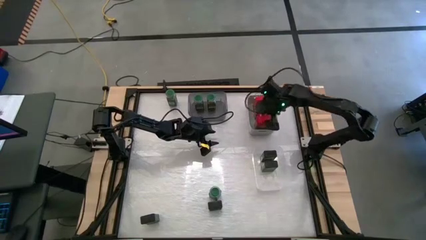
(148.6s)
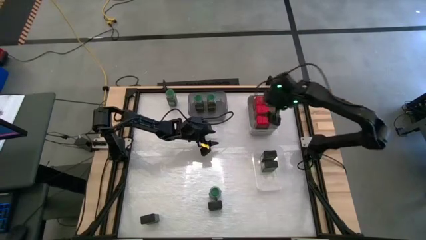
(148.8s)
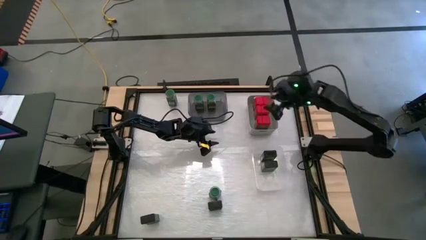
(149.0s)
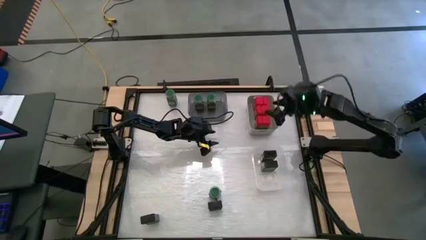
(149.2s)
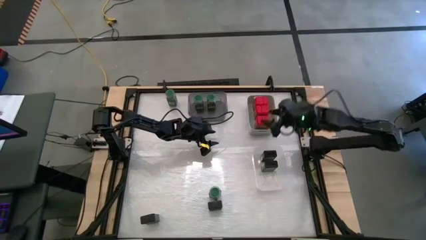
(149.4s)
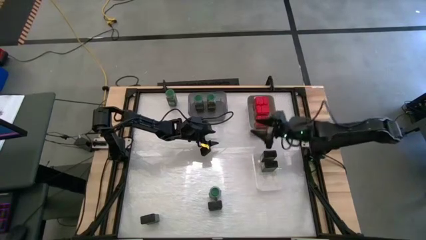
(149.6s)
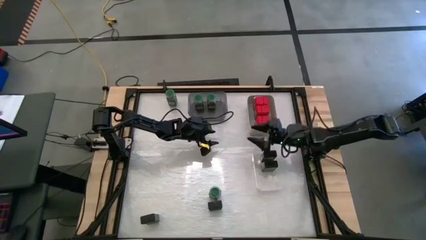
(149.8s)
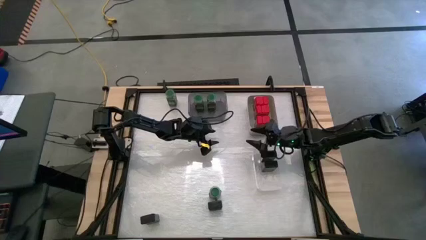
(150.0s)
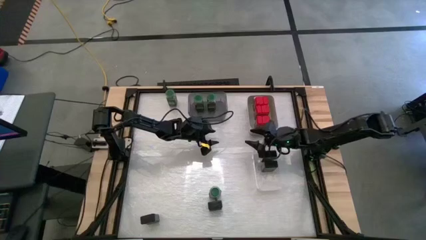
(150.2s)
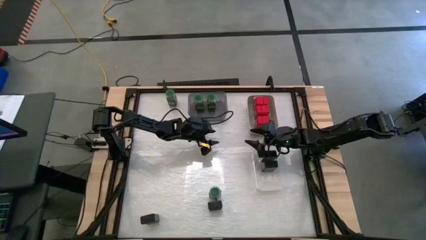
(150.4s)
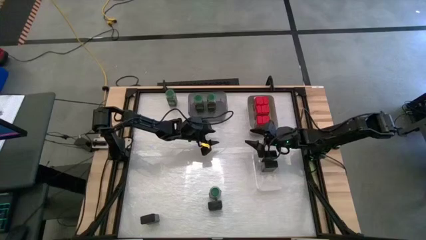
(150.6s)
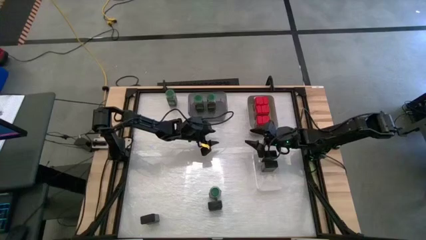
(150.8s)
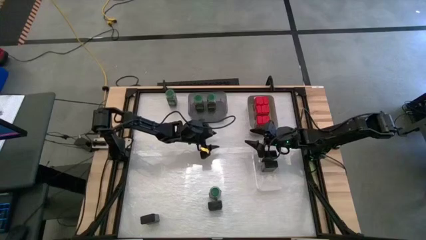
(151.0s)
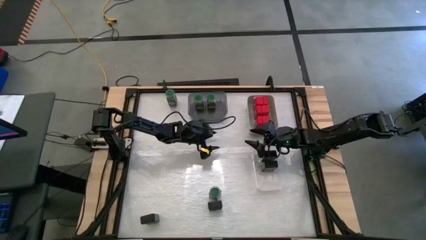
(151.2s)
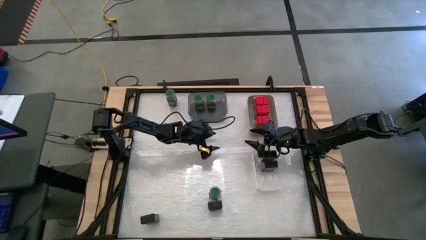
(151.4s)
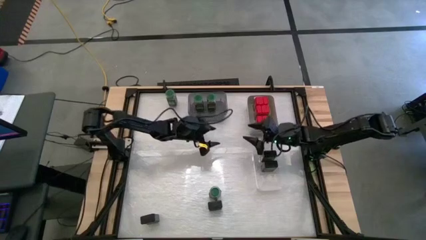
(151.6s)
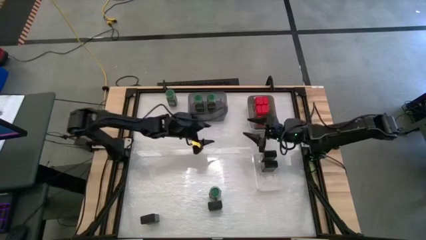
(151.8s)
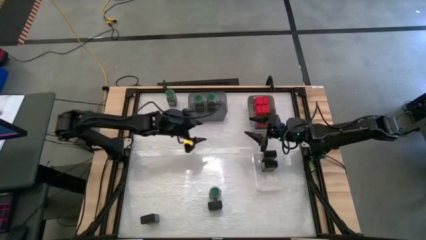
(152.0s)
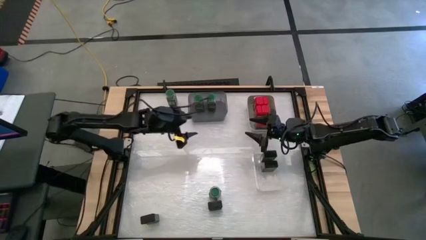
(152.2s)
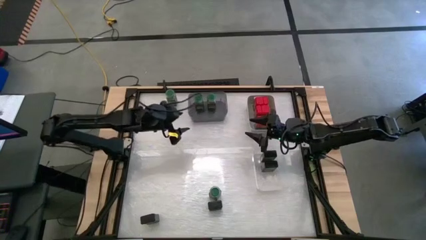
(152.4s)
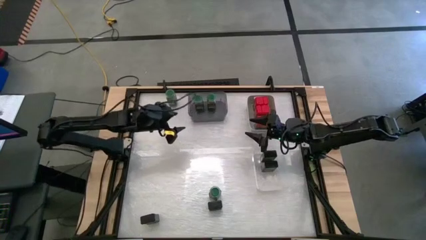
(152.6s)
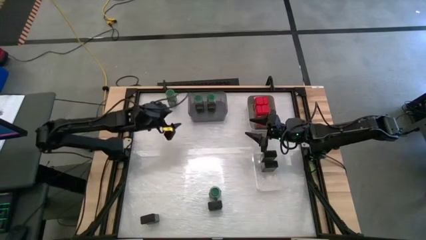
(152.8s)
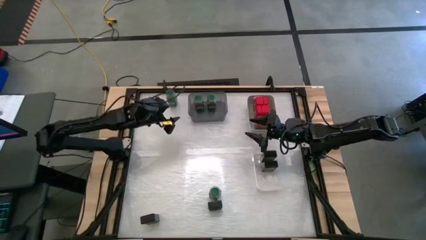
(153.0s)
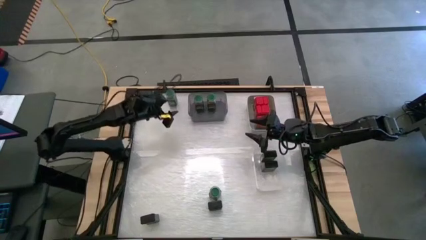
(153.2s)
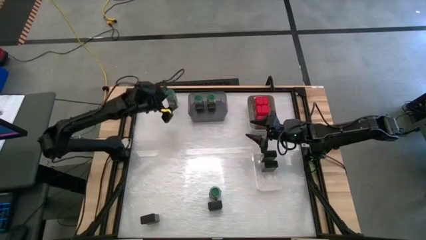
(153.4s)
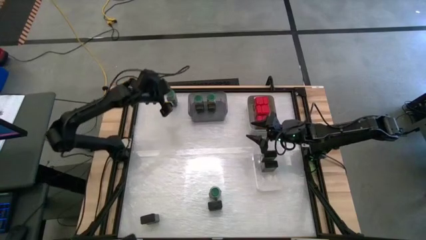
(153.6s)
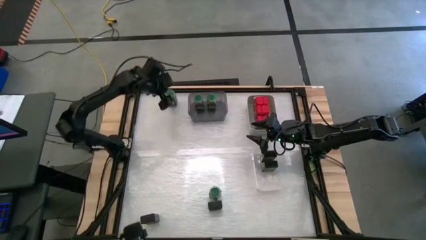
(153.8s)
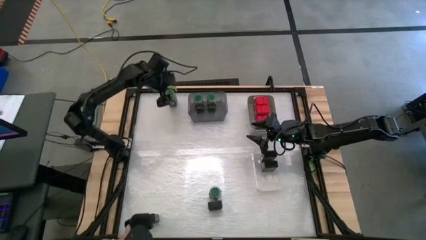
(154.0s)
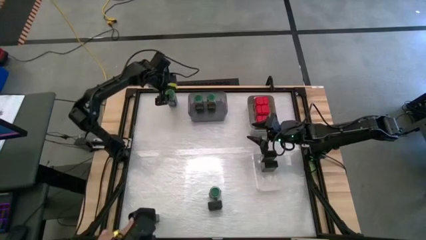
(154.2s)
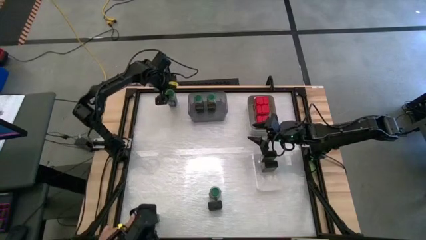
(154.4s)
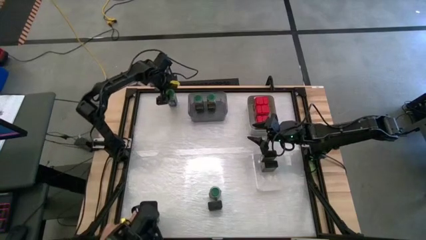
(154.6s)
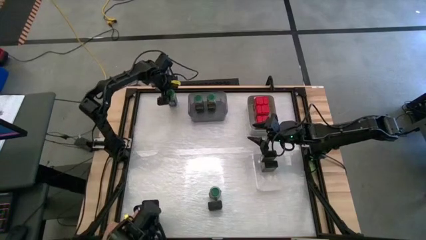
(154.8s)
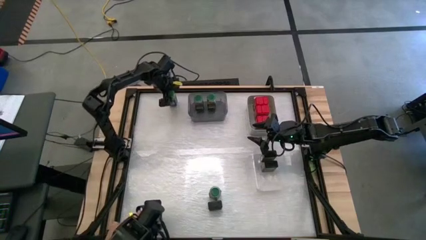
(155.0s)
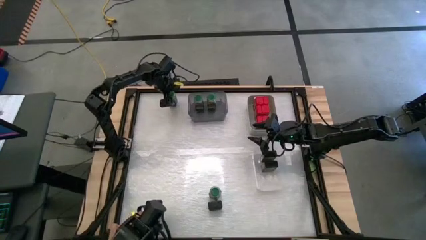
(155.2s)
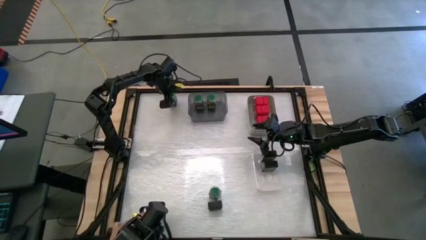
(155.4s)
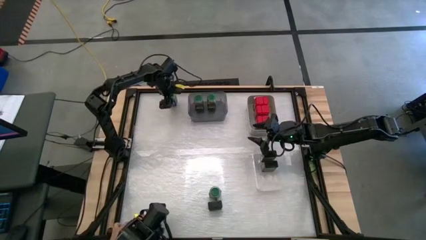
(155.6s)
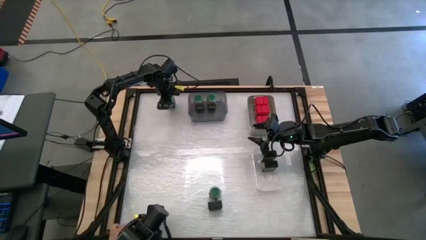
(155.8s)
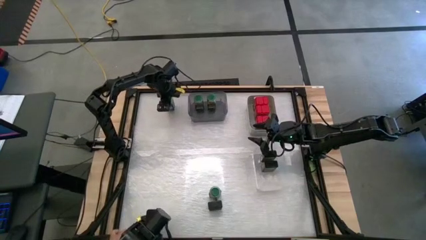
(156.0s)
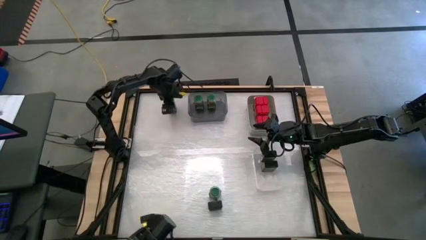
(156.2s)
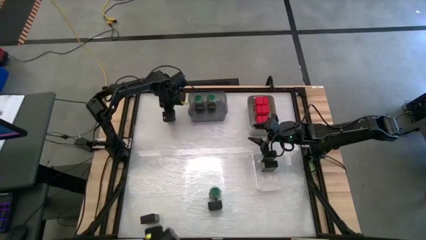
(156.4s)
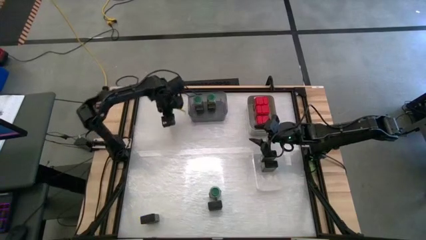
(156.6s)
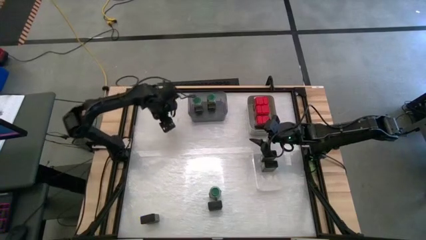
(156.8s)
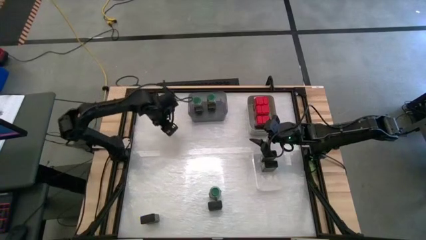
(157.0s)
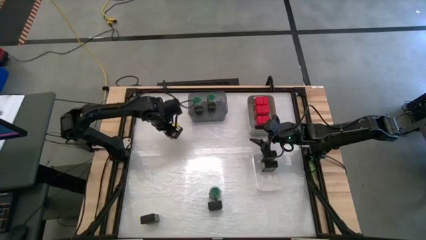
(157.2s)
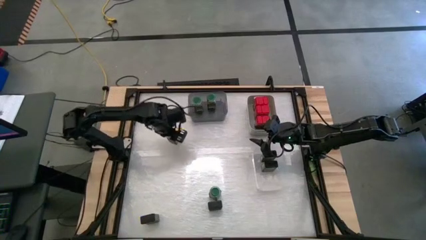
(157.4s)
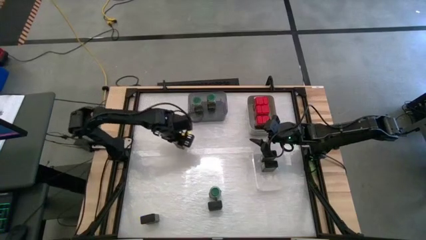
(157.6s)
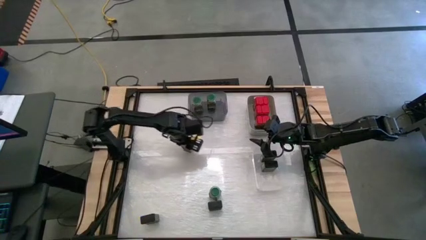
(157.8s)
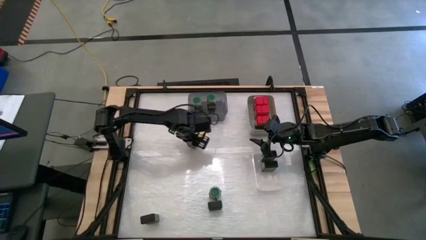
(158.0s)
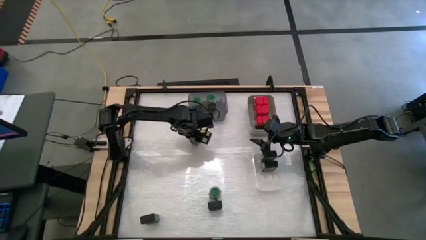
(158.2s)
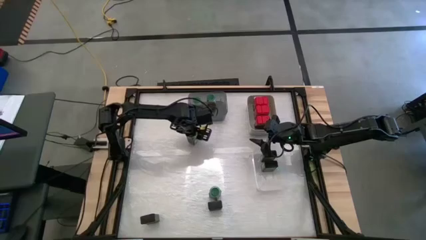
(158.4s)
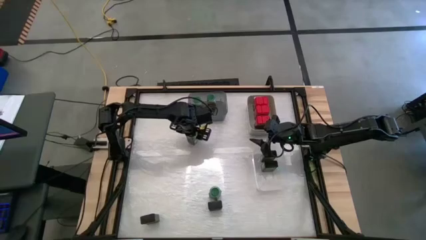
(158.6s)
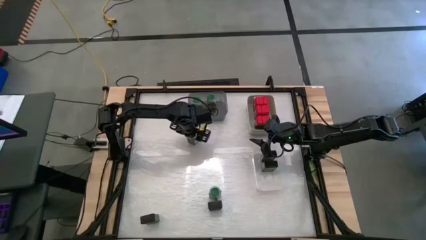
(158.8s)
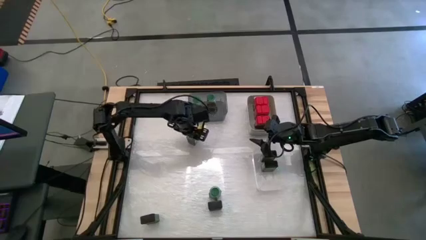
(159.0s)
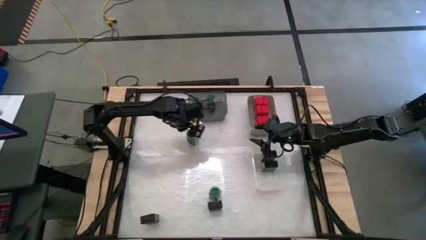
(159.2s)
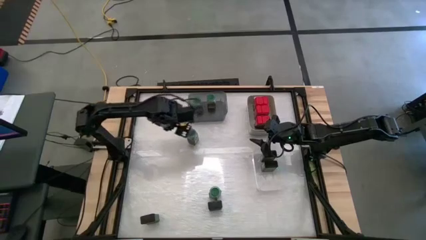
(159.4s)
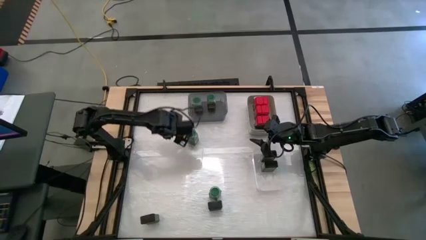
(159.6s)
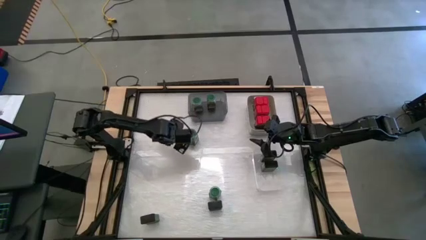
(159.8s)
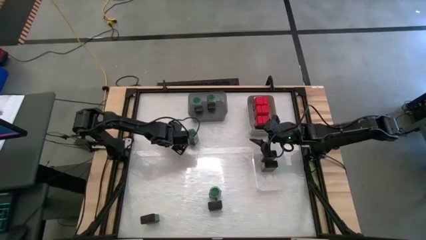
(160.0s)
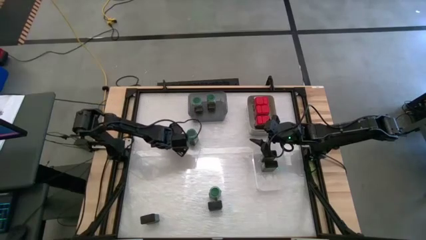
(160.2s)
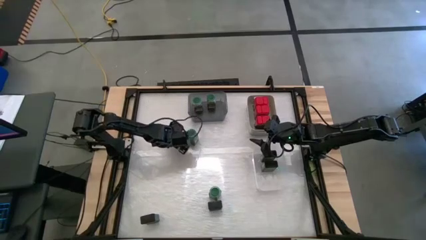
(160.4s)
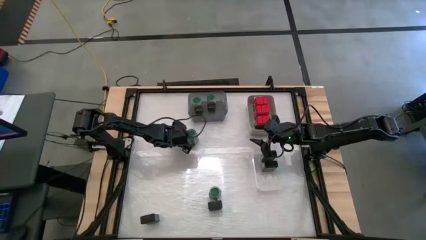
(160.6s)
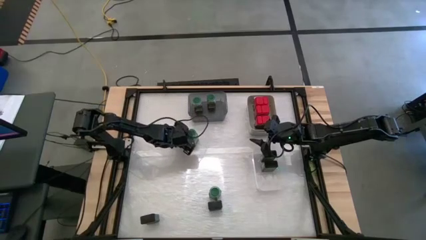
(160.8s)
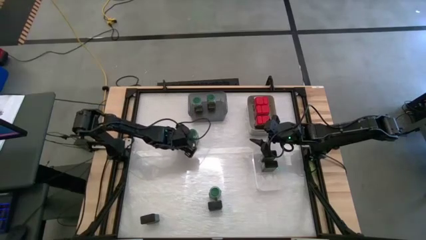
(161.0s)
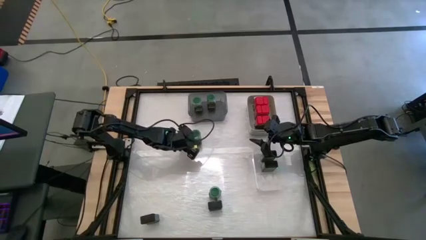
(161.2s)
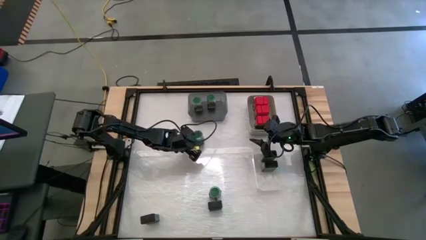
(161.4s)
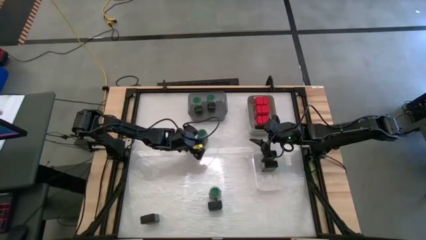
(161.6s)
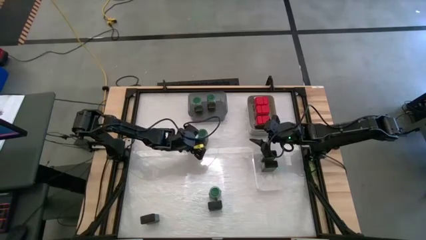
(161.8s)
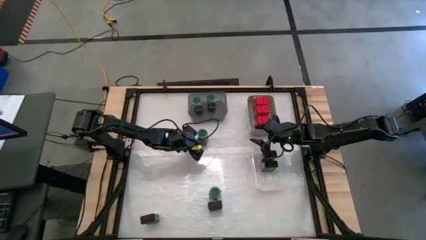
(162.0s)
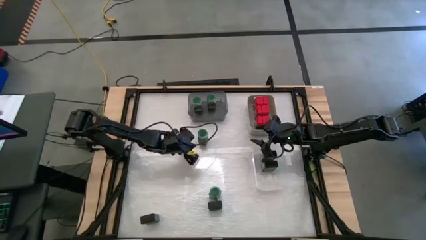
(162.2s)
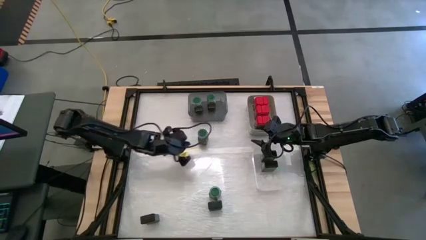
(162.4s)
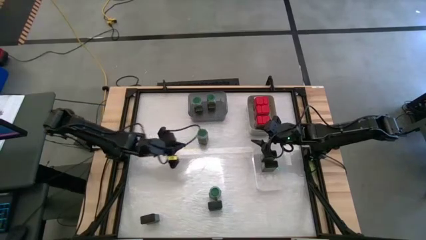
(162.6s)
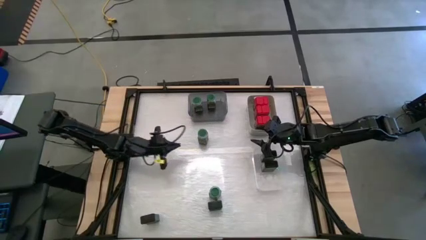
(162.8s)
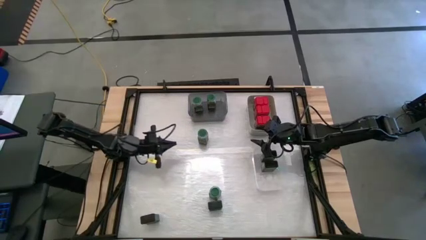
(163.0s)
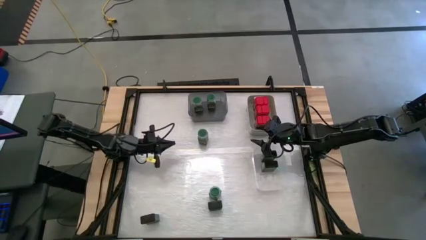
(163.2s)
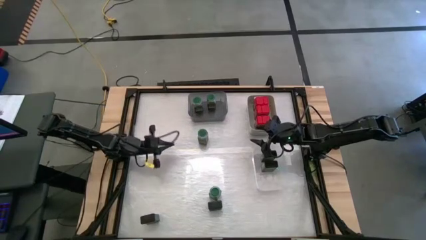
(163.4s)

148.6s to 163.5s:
Task: Sort spices by type
Move the top left green seasoning bottle to the center of the table
